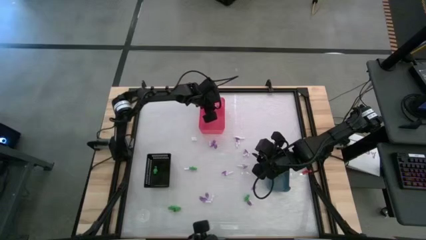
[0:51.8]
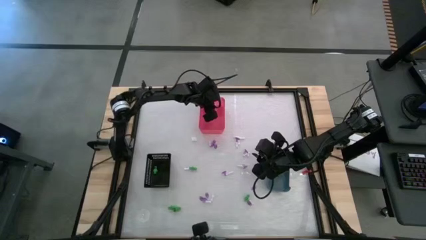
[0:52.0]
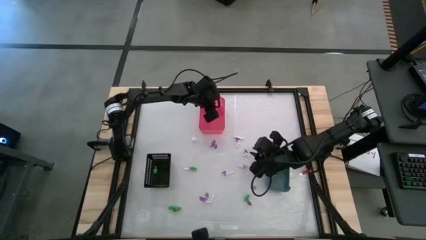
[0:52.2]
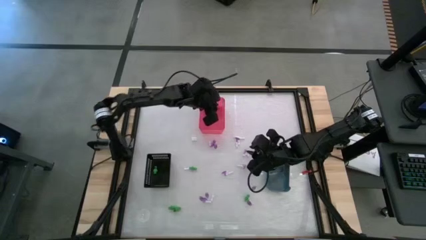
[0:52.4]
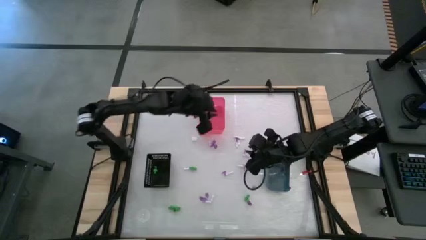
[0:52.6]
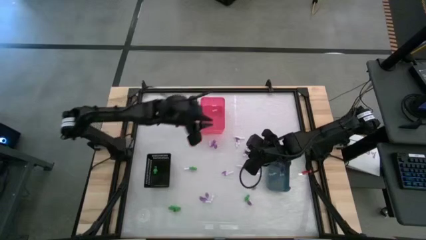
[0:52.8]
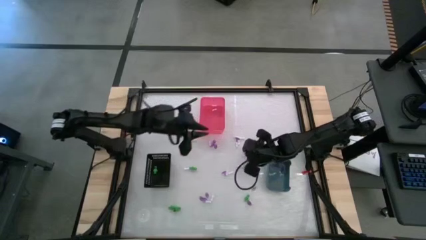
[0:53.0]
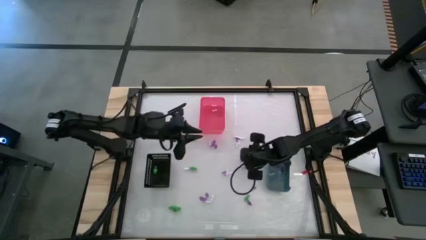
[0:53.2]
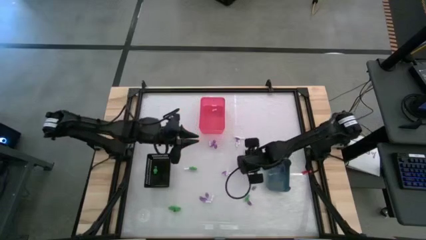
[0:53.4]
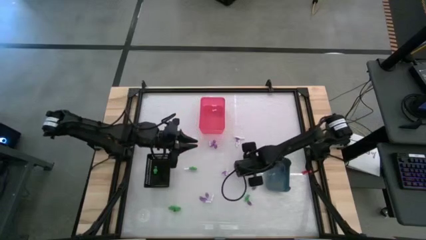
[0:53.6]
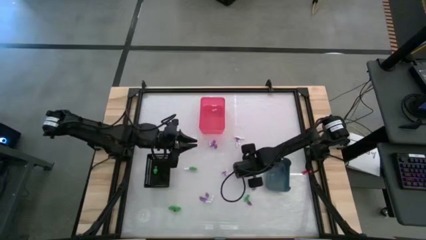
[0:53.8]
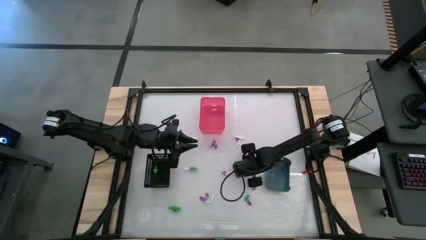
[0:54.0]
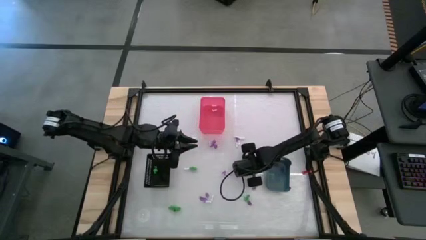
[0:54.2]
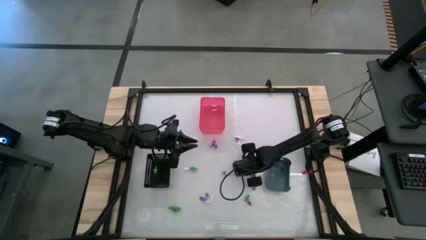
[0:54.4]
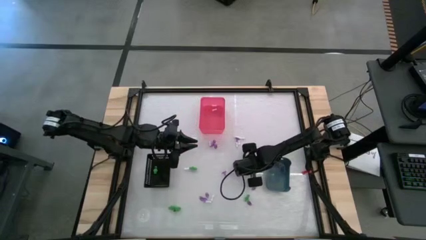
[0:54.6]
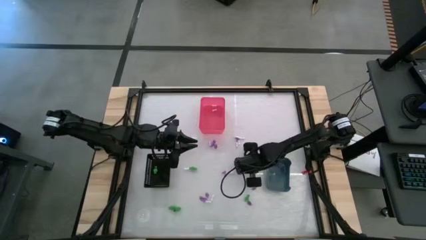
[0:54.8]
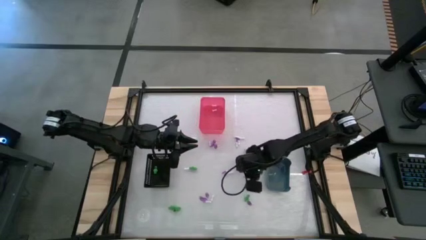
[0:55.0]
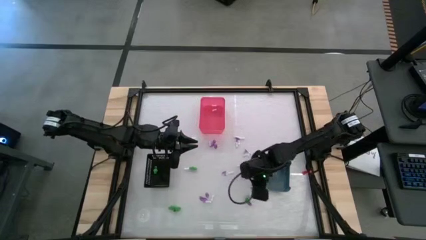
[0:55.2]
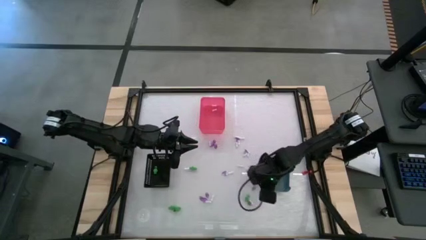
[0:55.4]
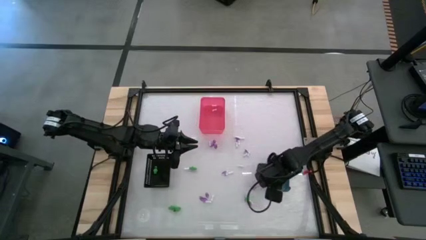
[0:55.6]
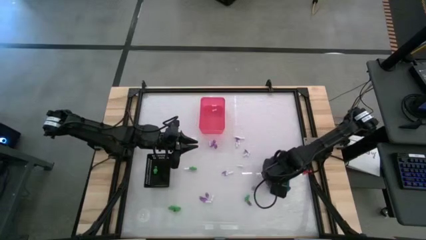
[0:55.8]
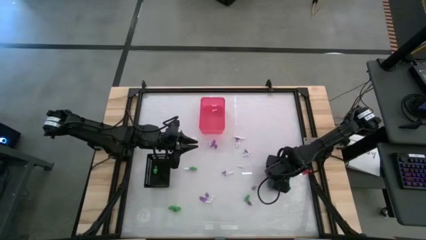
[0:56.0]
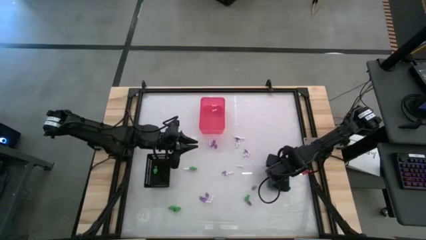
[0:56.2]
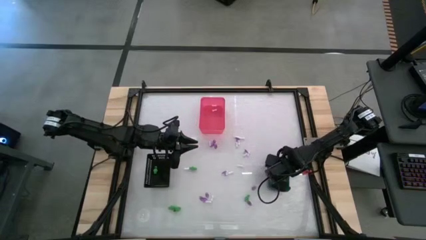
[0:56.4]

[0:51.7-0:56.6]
Task: Sort Halloween decoration
Put the witch hat toy into the blue bin

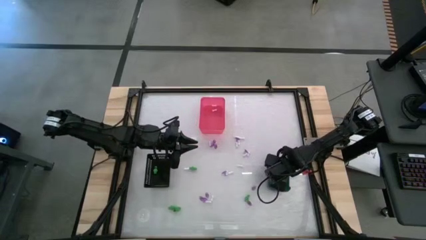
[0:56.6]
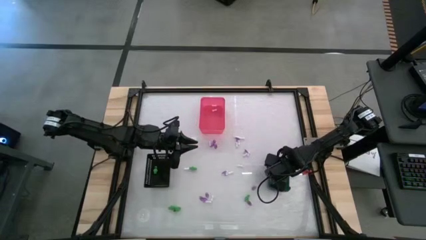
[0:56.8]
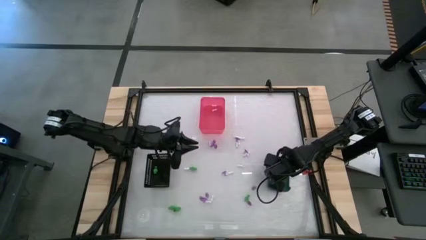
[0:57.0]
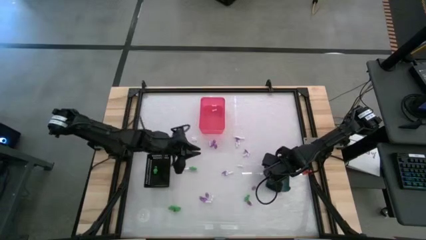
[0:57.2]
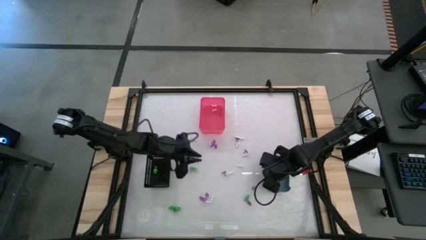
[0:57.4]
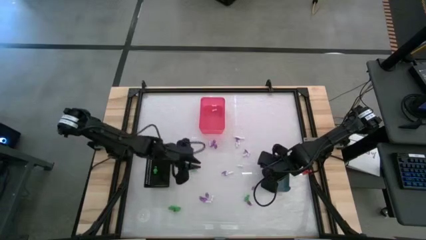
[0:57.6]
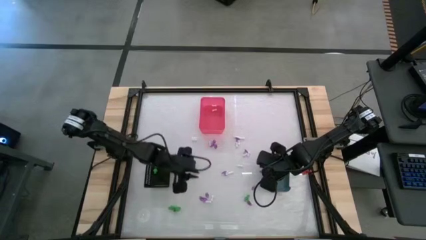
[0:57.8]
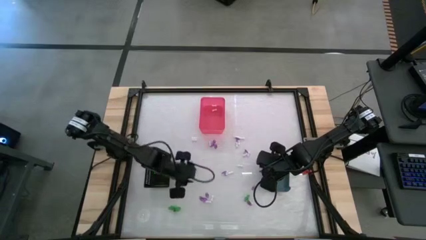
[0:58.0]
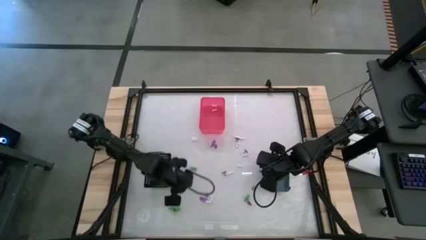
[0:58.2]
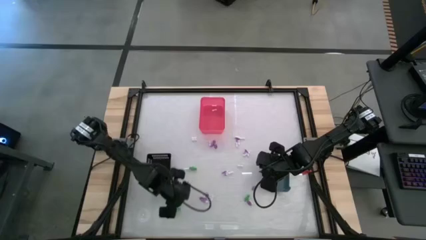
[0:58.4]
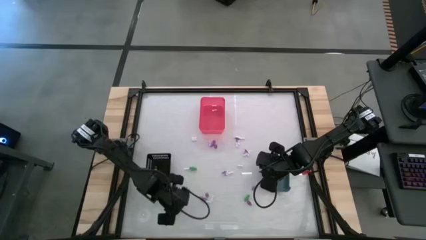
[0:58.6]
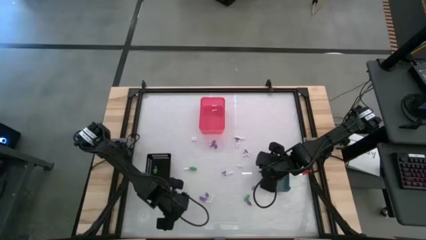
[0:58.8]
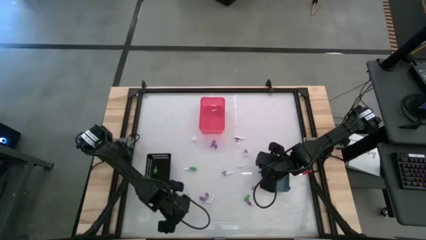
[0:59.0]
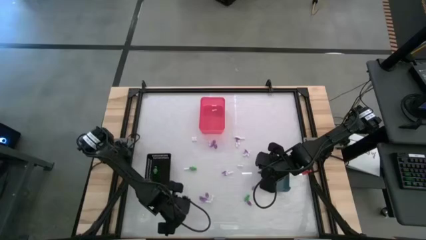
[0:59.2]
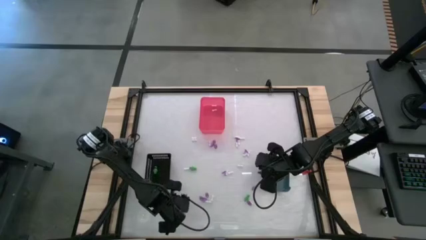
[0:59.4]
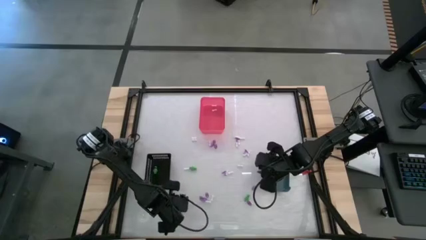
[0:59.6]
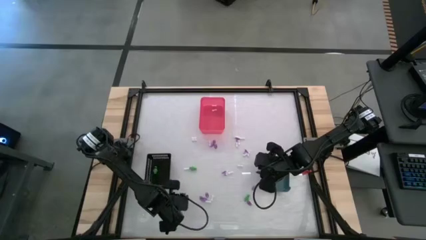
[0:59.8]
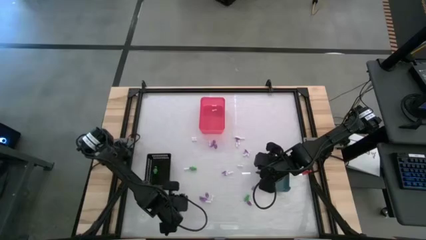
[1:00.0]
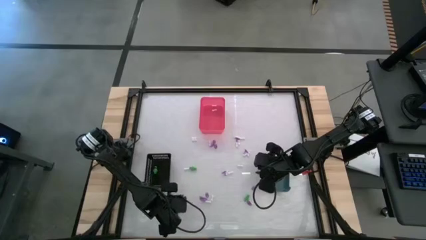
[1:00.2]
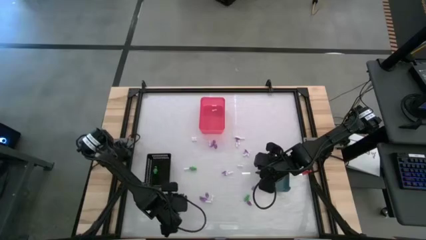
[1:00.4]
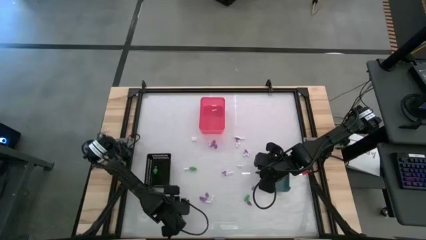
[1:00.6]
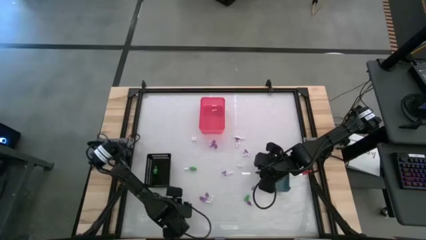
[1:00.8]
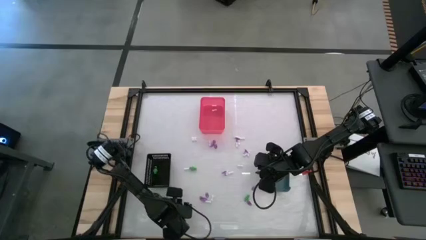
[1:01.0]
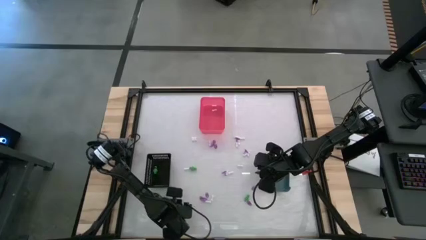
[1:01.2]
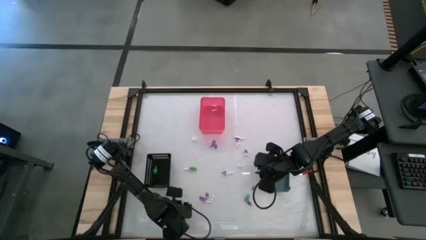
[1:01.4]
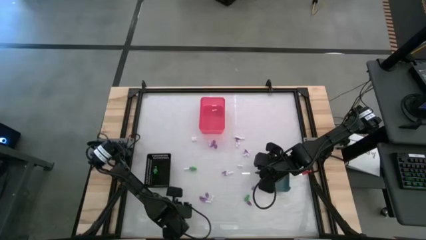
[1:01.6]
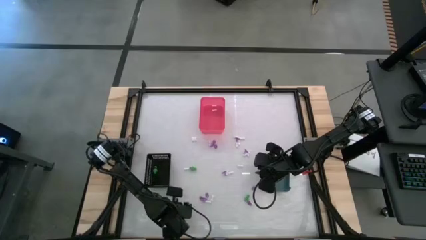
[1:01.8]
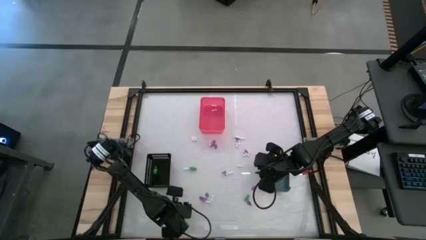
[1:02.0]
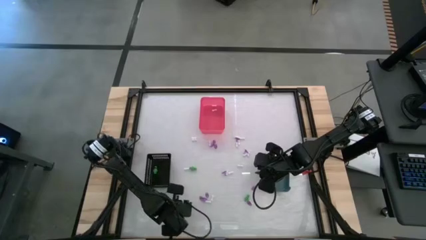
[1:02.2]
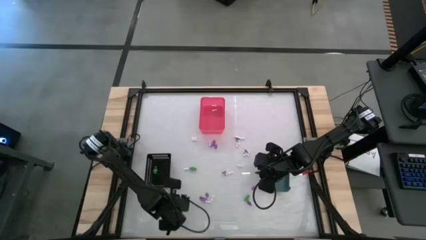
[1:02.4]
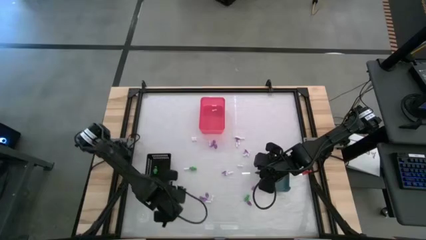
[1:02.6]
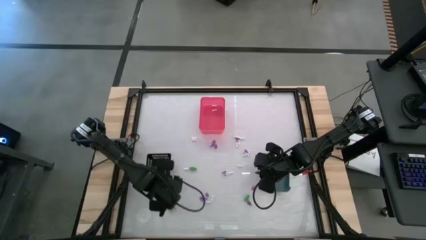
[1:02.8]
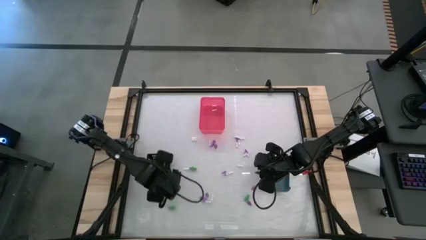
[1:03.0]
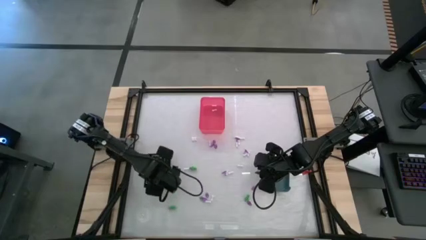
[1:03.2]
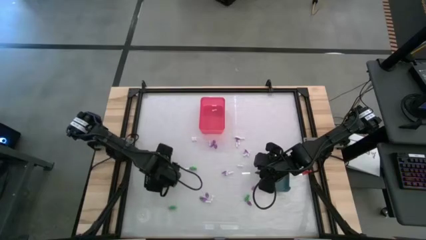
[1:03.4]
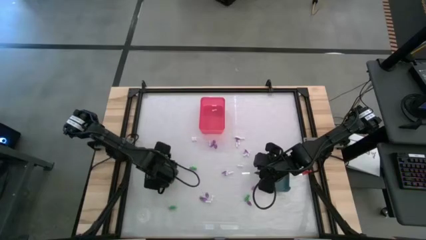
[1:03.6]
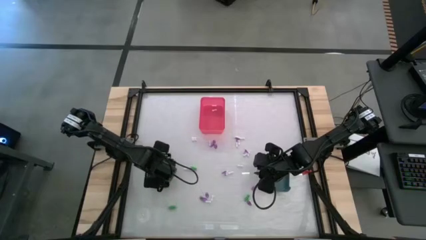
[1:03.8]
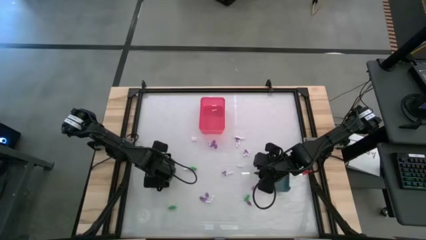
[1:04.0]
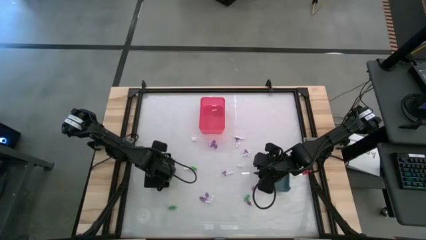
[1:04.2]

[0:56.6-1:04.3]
Put the skeleton toy into the black basket

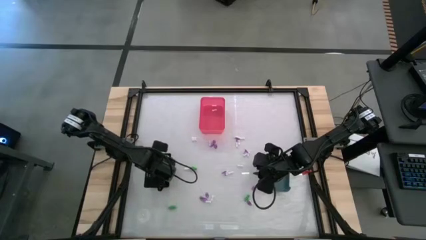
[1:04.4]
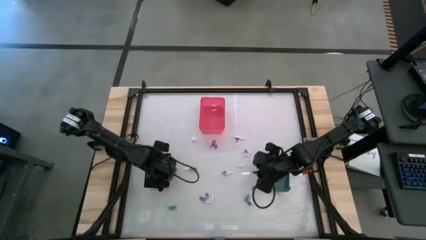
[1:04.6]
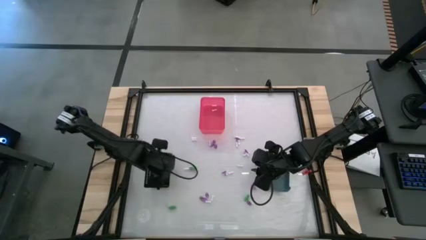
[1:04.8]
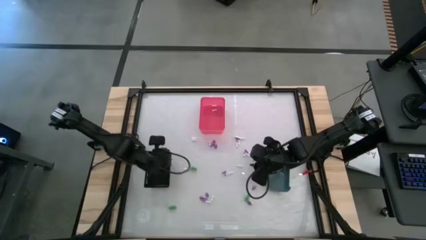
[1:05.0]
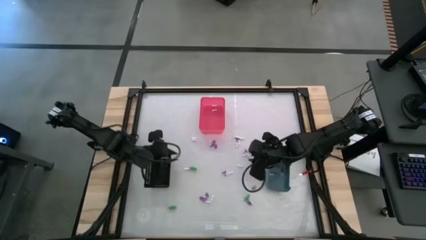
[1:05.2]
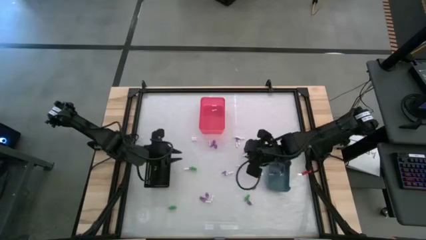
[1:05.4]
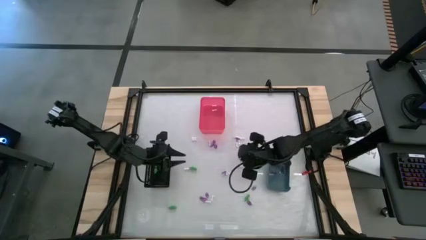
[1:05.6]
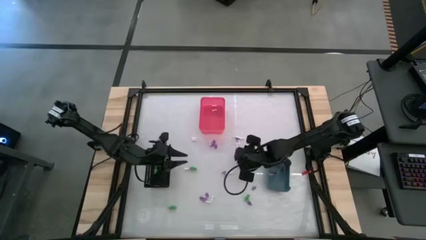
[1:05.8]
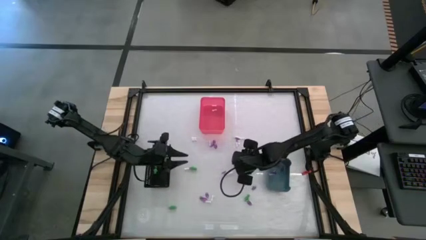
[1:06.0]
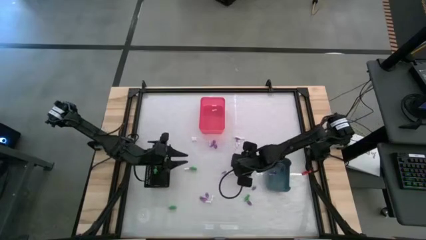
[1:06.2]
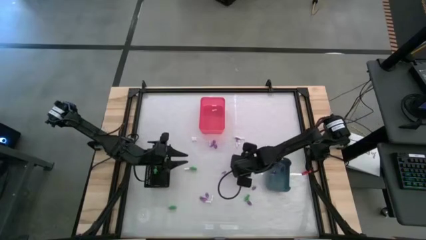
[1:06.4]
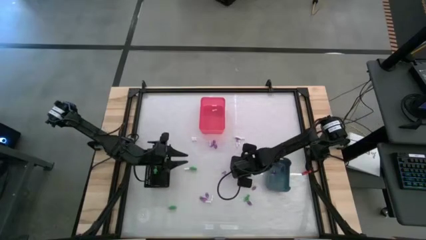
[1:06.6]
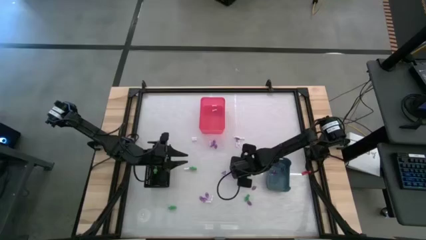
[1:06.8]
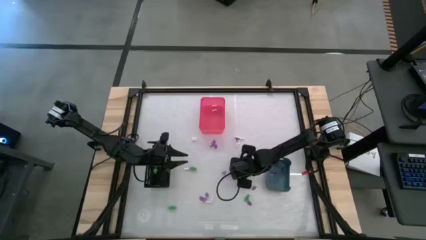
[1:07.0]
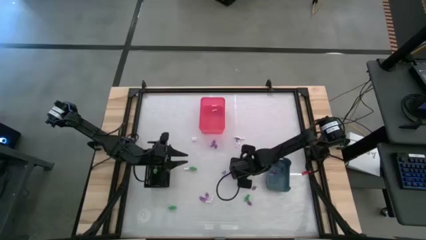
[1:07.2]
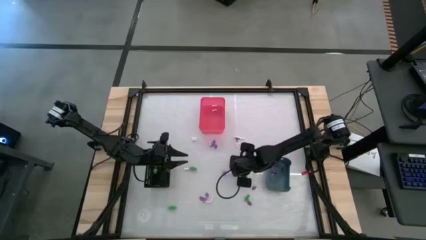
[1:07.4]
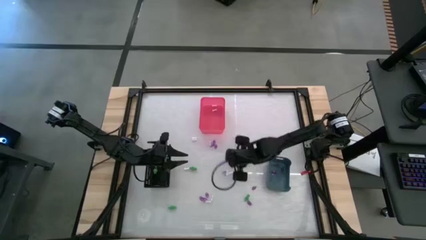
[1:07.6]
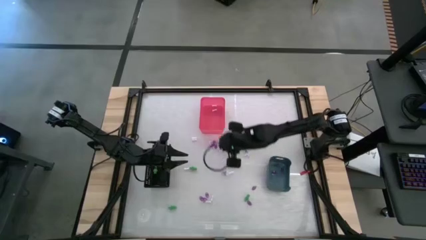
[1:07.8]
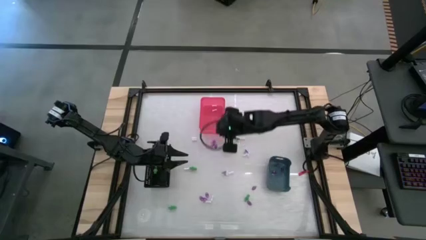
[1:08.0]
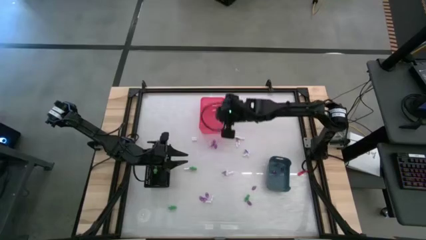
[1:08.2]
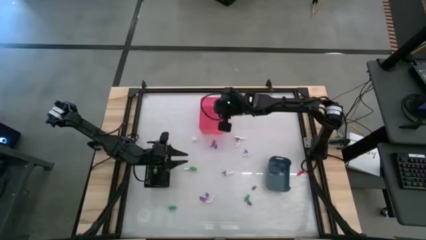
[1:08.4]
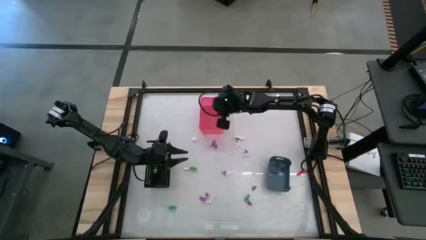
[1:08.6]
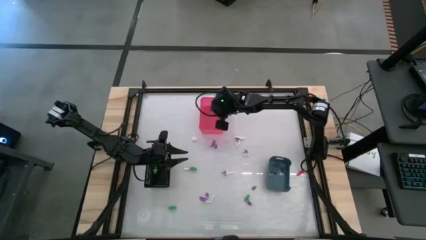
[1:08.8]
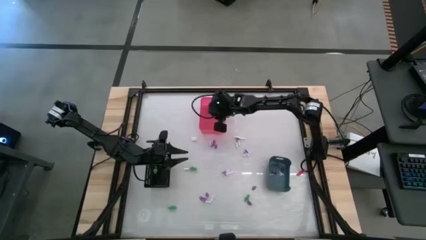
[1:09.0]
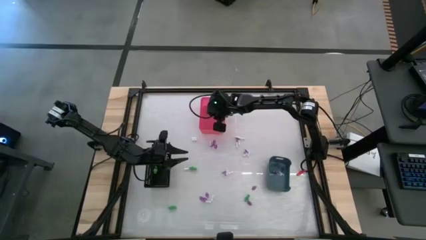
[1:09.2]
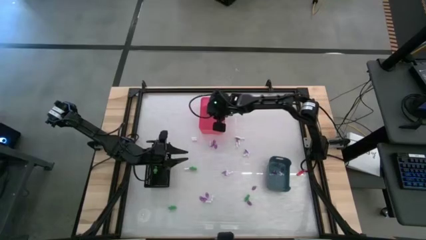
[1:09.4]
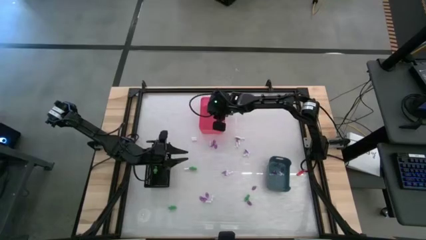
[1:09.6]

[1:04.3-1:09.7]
Put the bone toy into the red bin
